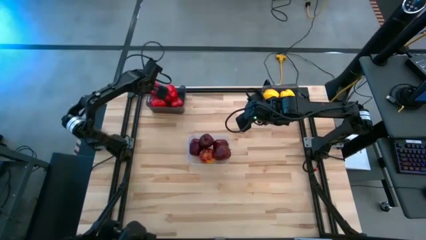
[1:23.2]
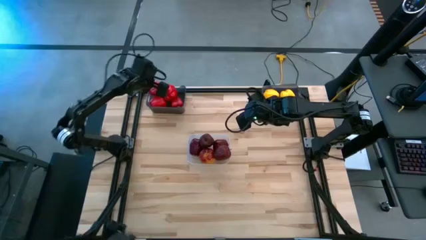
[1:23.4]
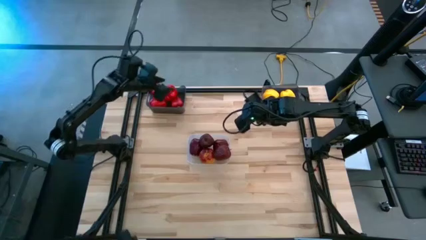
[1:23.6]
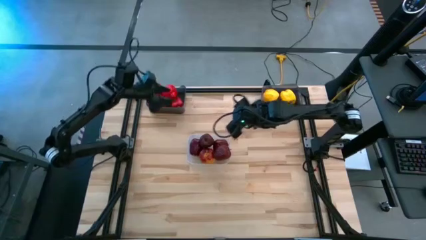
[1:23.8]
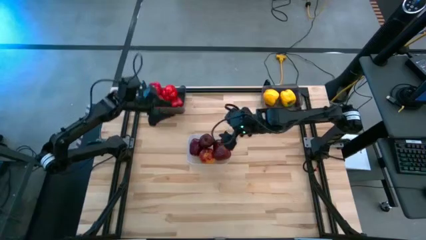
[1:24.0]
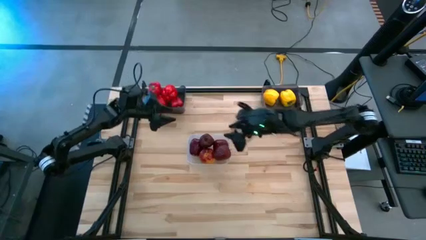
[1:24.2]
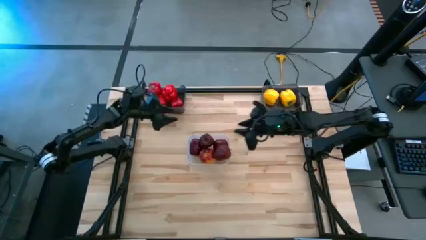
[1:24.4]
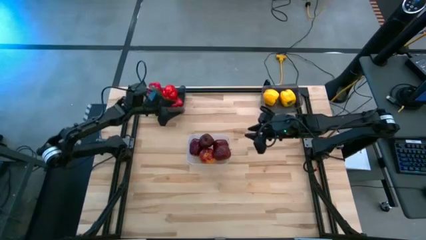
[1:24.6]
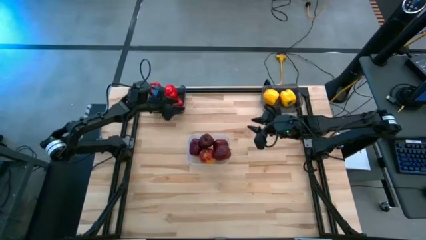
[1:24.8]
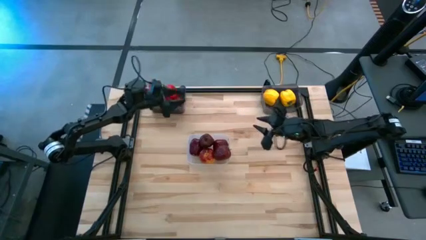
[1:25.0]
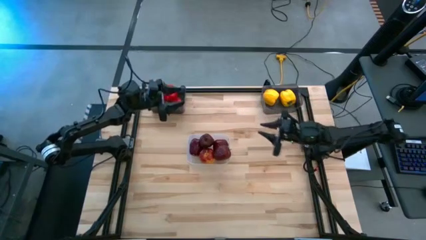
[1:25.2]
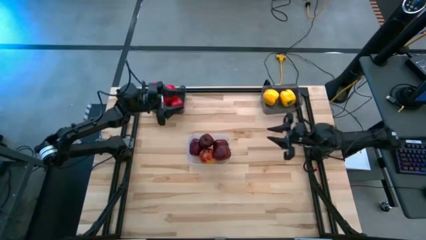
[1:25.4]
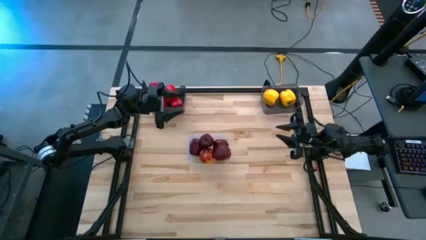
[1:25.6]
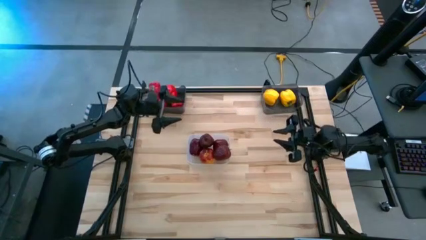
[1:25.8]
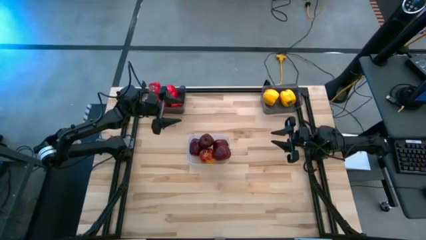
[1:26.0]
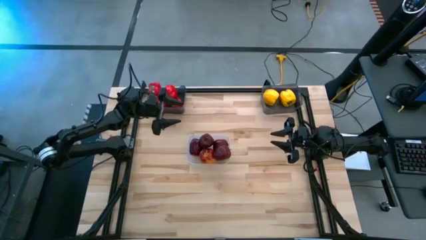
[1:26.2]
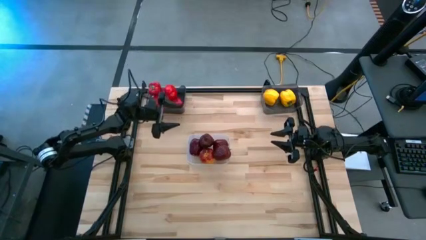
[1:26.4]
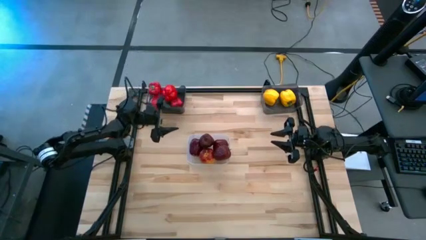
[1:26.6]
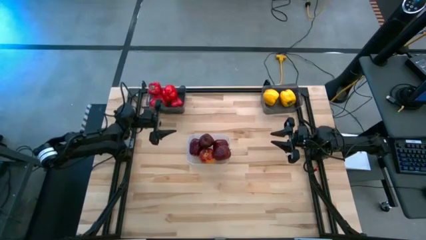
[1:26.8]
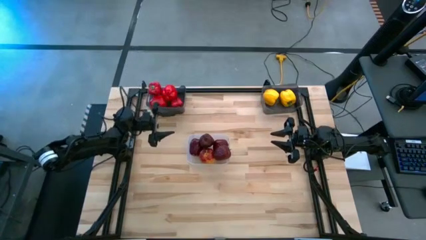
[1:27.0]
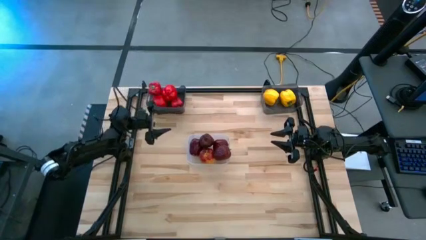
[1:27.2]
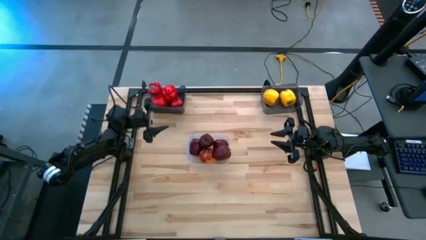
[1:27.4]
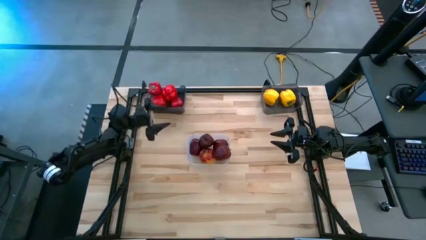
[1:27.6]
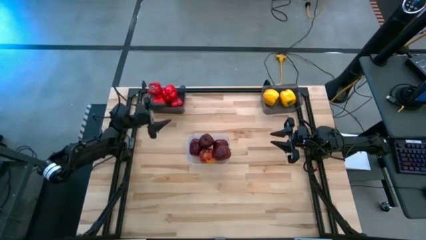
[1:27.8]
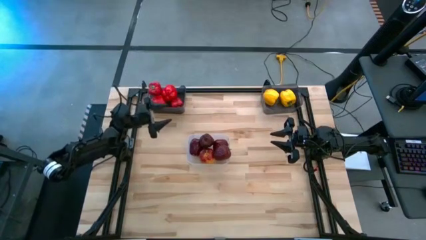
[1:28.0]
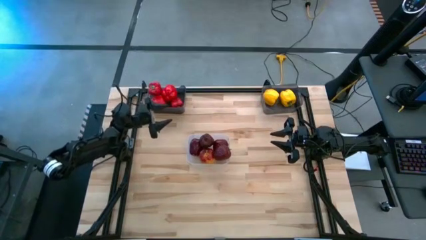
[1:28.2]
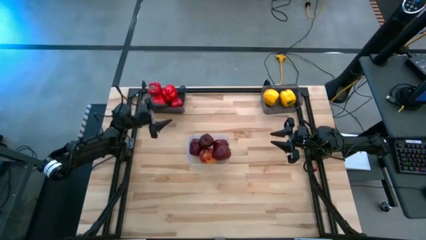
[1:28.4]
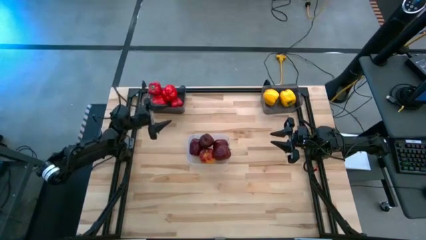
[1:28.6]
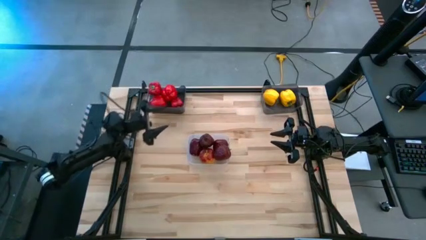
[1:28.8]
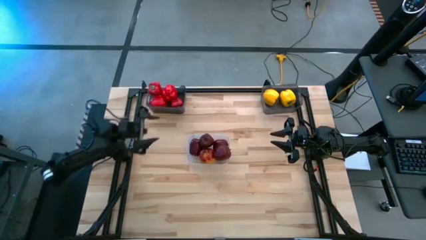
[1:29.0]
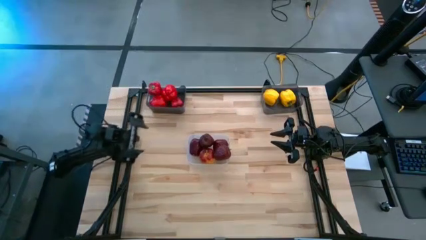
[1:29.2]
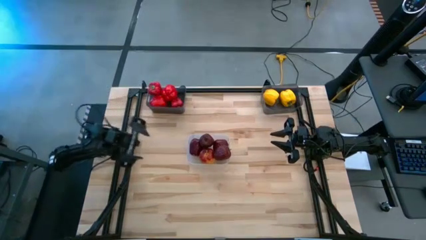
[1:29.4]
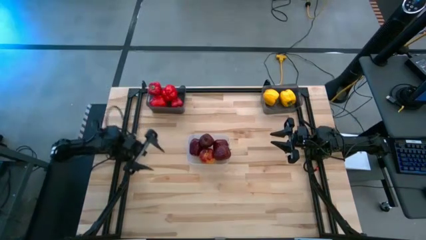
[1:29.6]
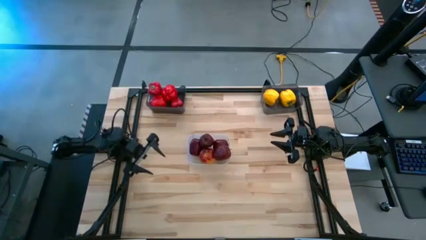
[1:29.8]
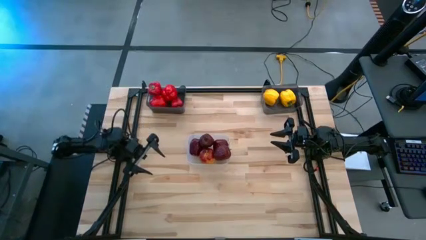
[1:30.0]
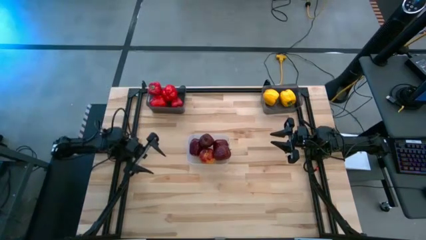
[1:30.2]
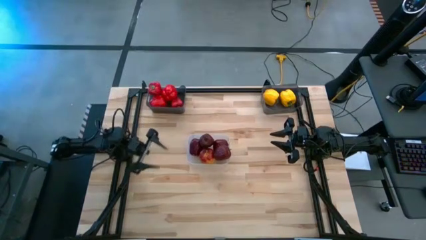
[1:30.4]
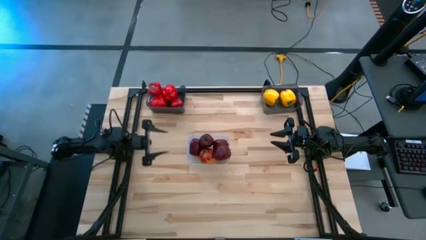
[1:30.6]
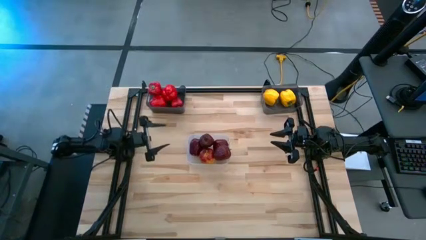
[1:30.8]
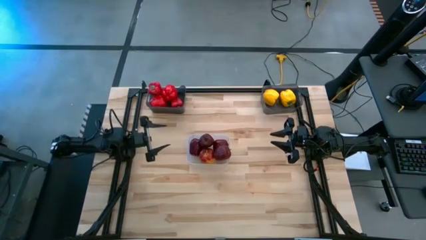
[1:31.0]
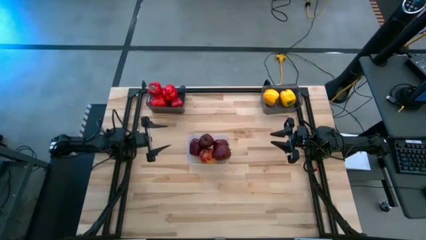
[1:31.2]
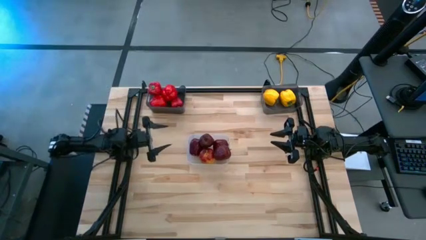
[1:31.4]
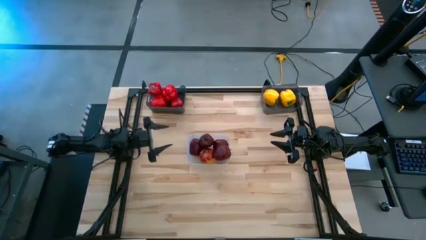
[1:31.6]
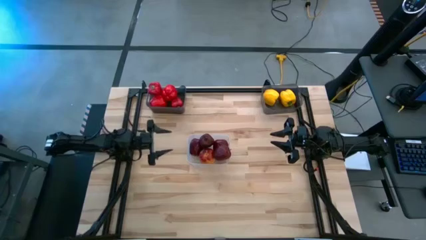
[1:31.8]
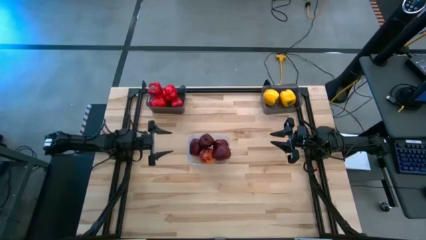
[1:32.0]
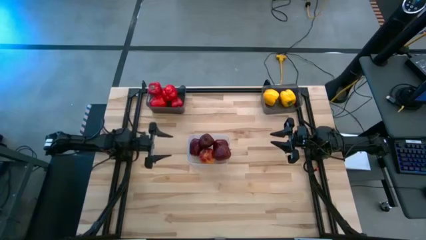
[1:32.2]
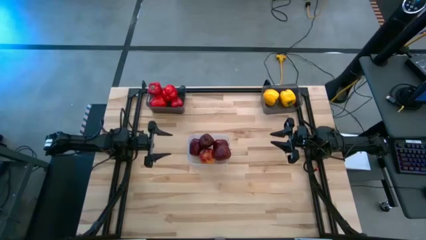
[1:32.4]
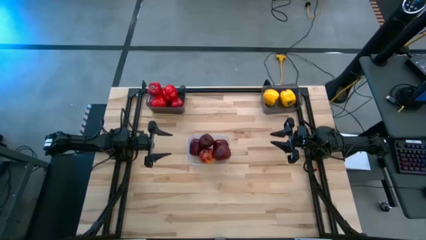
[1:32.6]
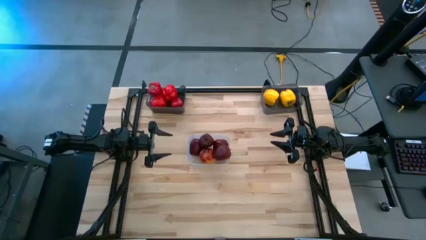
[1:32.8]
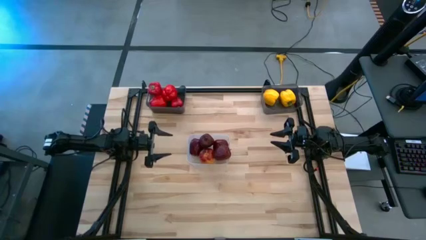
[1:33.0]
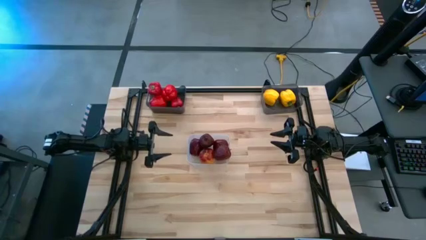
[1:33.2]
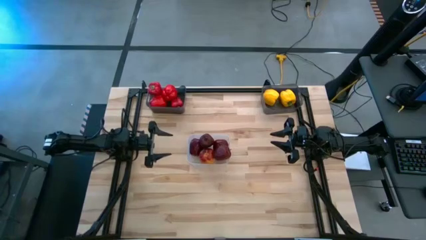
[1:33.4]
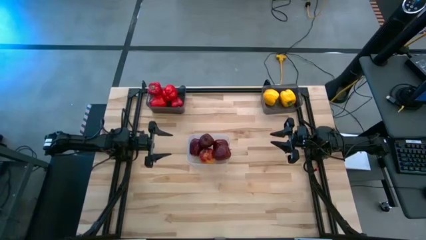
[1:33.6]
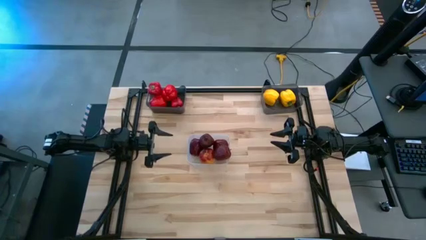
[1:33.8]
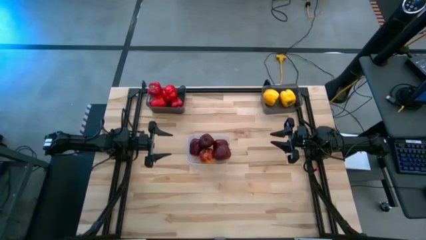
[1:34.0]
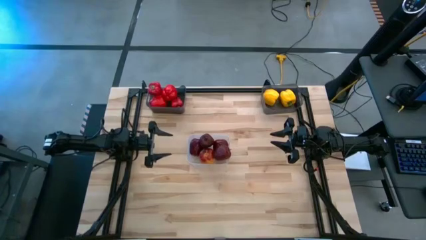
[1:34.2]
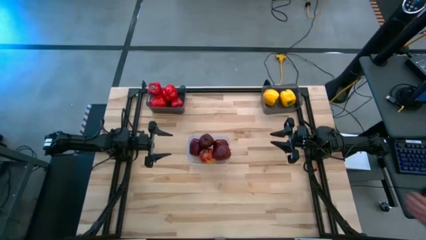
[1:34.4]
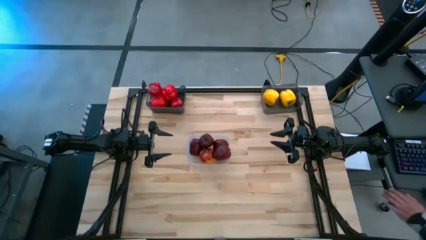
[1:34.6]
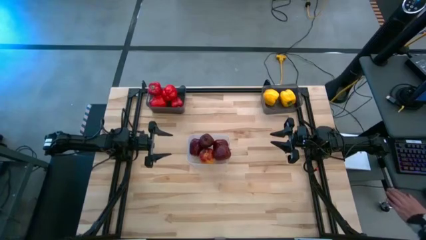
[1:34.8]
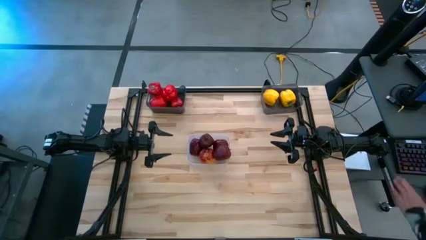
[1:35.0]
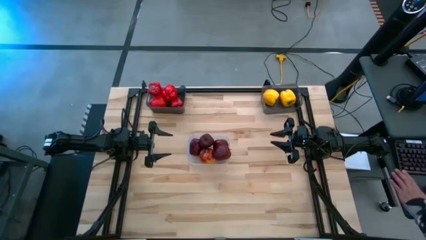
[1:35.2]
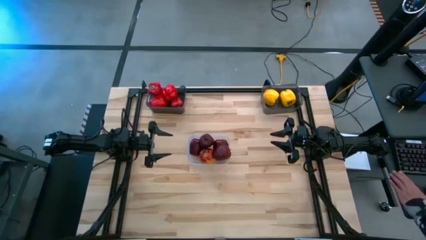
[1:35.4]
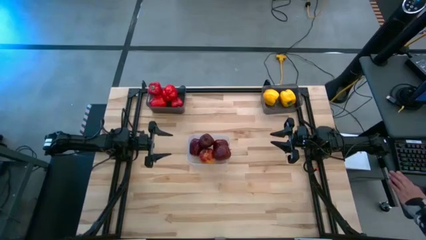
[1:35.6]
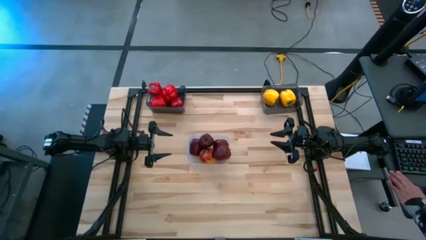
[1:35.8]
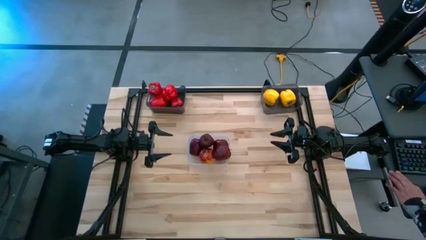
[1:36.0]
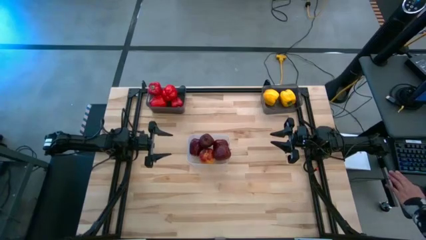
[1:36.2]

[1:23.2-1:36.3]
Task: Sort produce into baskets
Return to Home Position

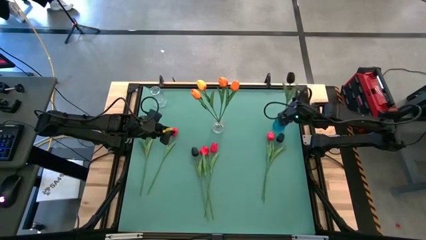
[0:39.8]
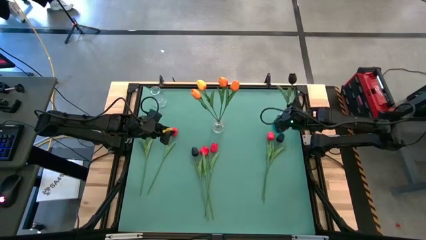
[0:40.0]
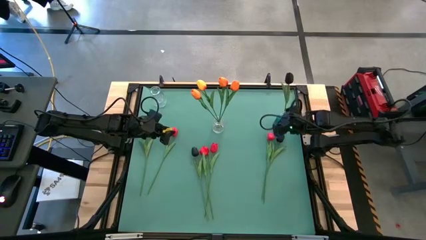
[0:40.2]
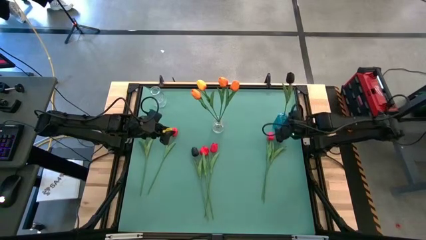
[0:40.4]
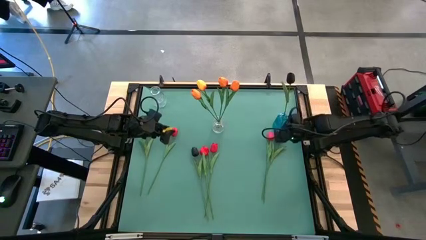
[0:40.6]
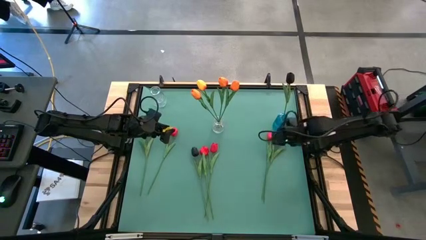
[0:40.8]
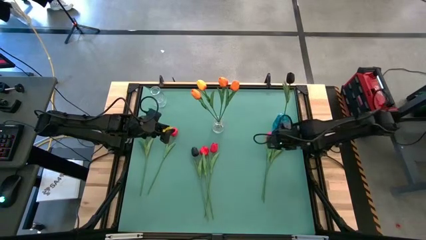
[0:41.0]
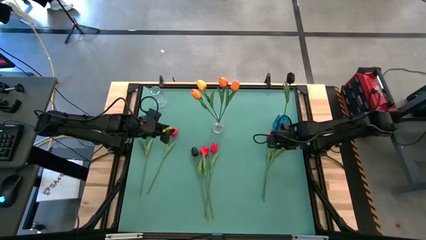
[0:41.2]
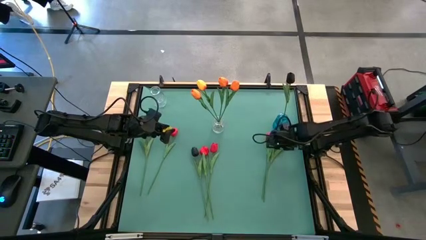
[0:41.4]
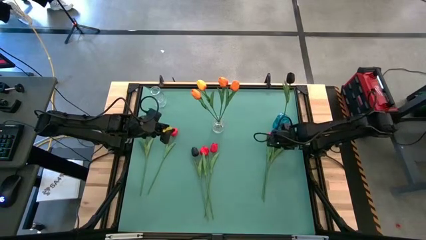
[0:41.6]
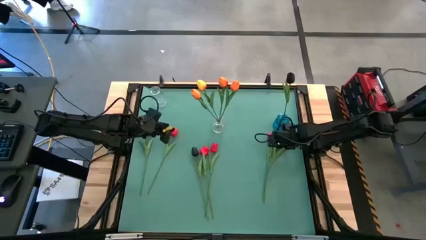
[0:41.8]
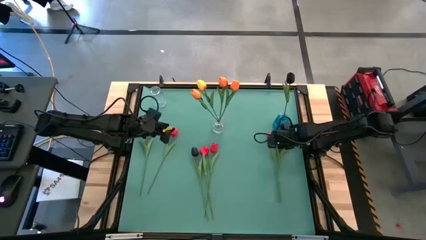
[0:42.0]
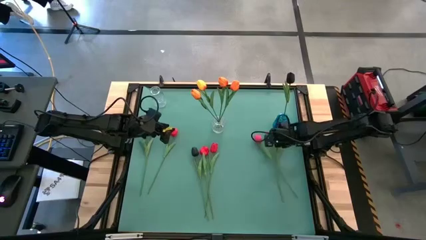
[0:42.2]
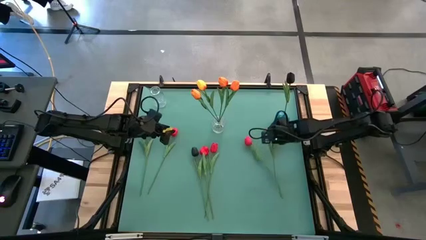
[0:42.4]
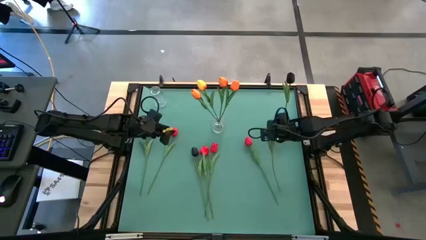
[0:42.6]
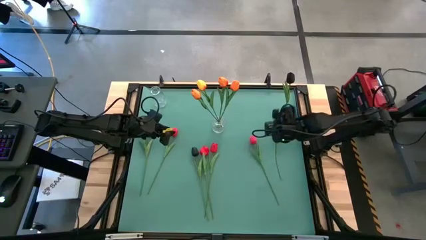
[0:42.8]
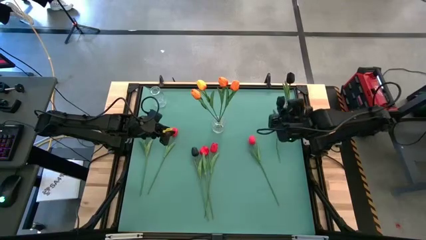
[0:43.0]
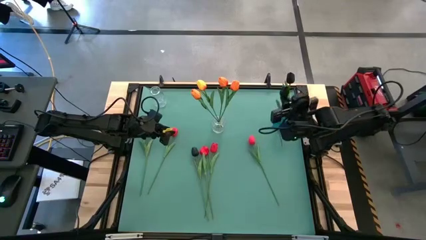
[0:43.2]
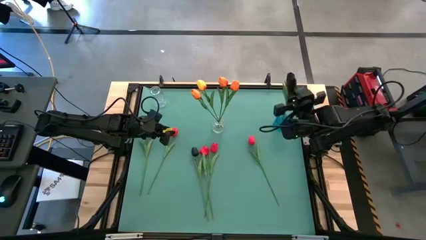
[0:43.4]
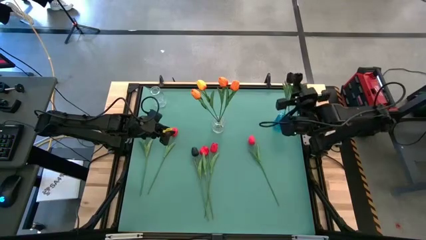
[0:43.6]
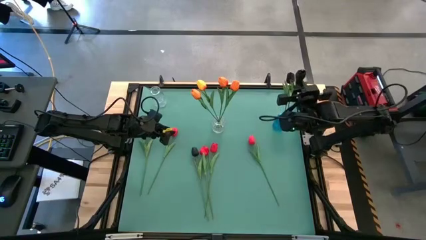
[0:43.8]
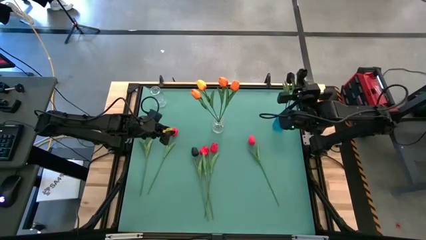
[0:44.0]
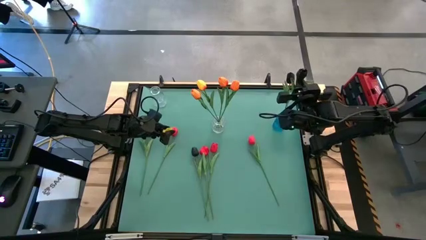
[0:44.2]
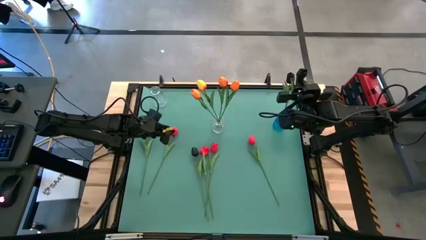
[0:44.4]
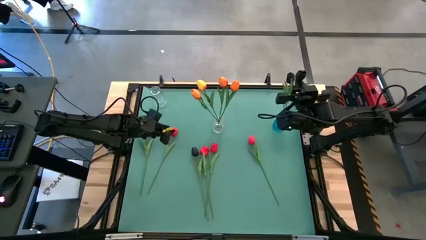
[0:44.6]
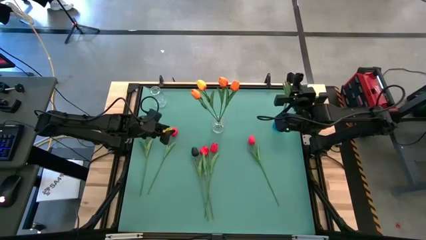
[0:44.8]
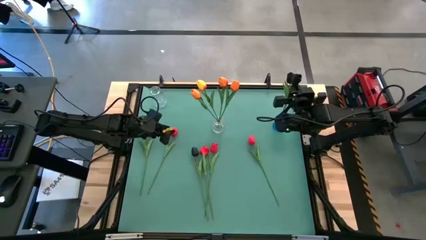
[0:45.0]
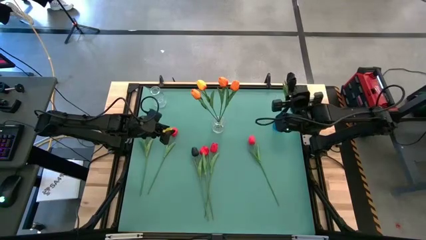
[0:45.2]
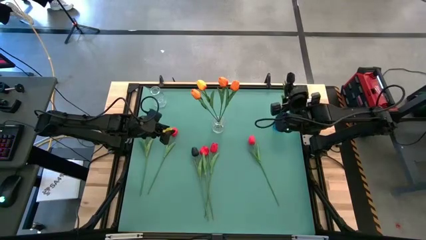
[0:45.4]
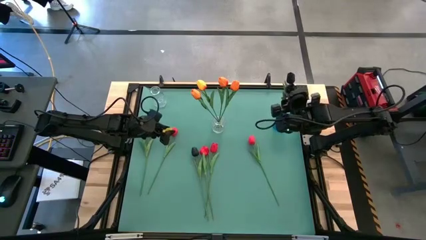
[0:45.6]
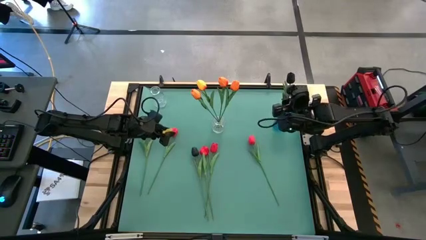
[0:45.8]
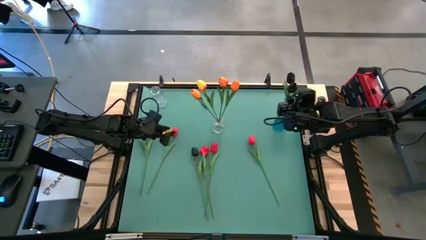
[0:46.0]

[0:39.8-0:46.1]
Task: Sort flowers into vase by color
Put the black tulip into the blue vase
